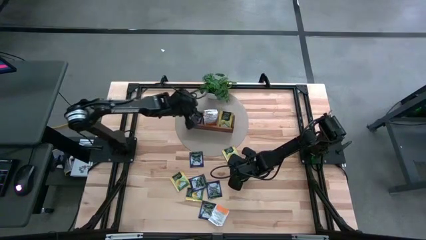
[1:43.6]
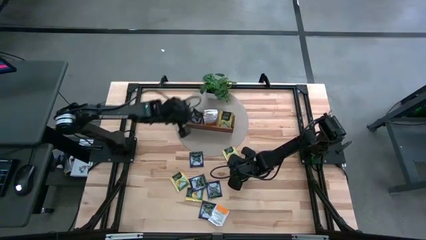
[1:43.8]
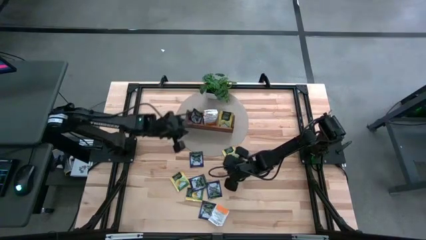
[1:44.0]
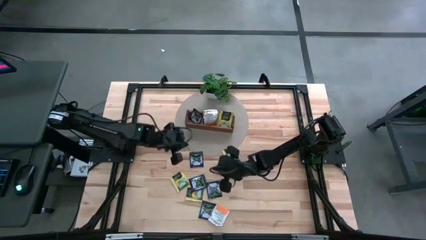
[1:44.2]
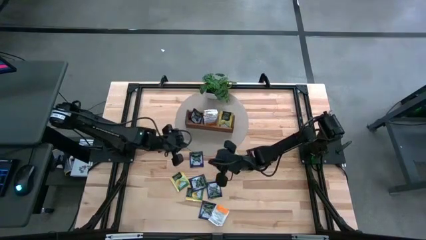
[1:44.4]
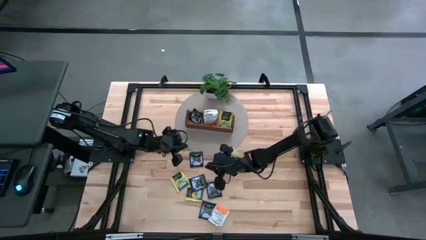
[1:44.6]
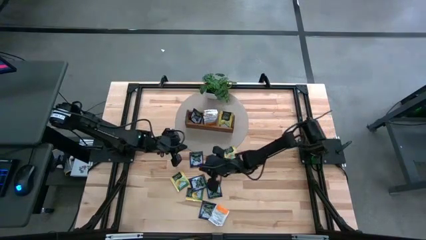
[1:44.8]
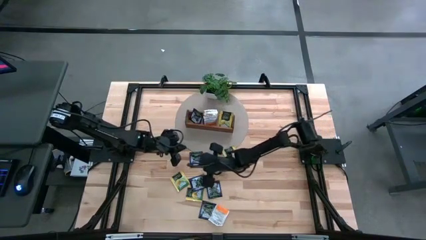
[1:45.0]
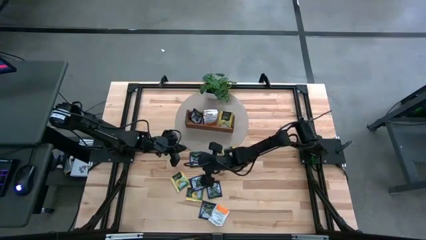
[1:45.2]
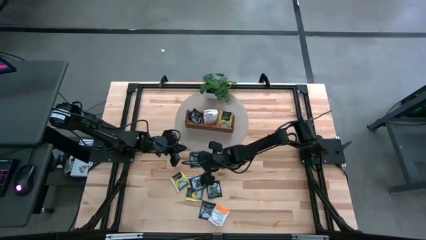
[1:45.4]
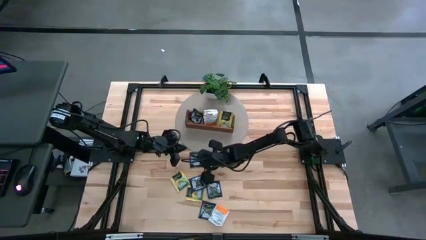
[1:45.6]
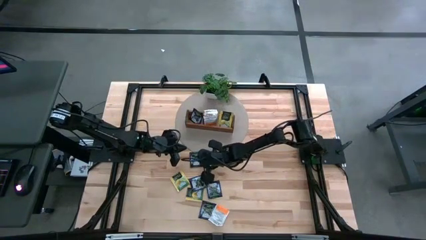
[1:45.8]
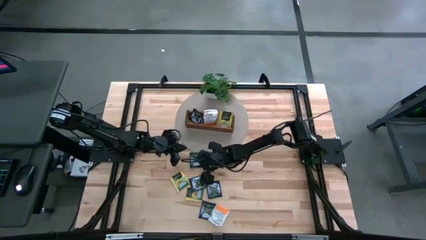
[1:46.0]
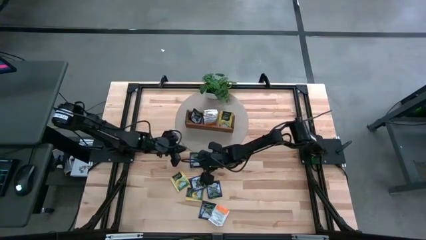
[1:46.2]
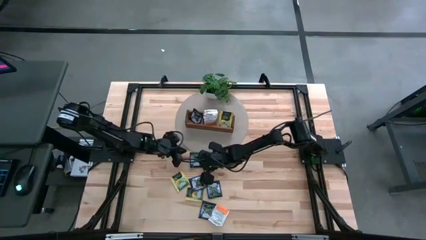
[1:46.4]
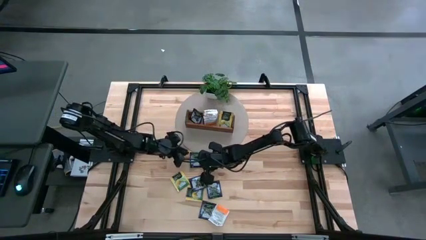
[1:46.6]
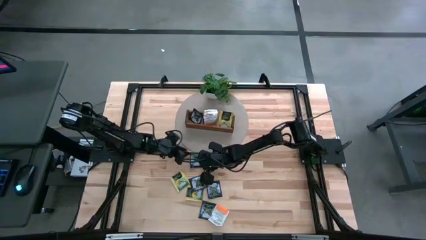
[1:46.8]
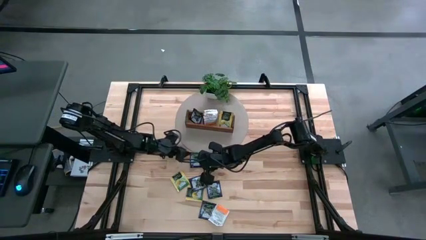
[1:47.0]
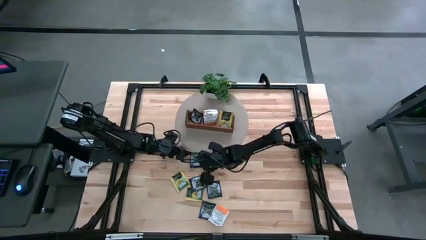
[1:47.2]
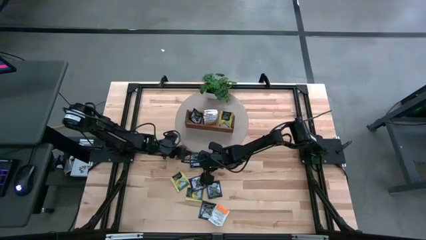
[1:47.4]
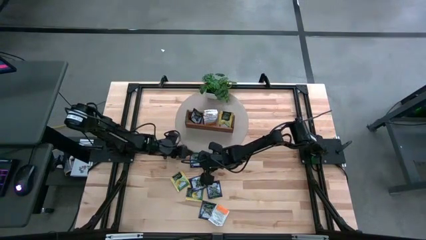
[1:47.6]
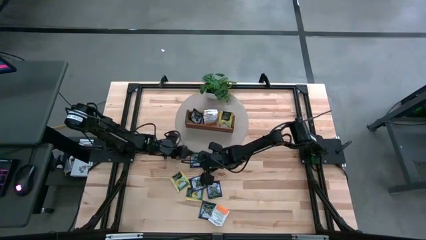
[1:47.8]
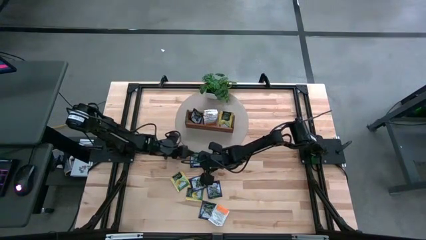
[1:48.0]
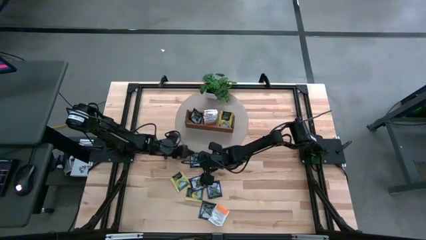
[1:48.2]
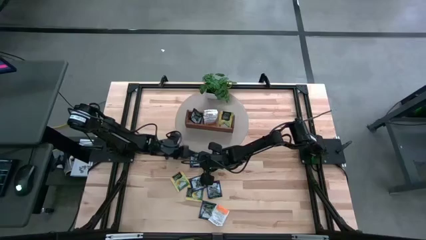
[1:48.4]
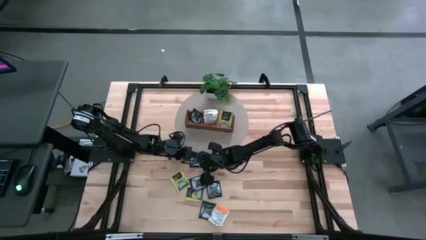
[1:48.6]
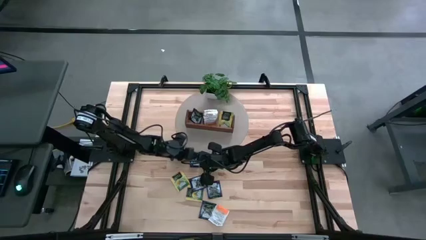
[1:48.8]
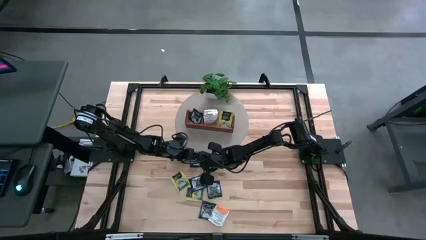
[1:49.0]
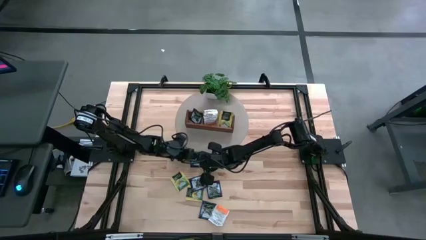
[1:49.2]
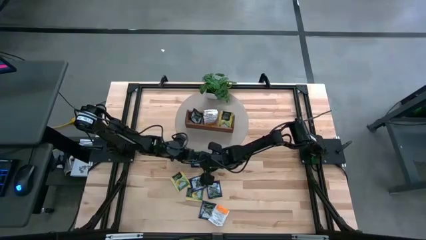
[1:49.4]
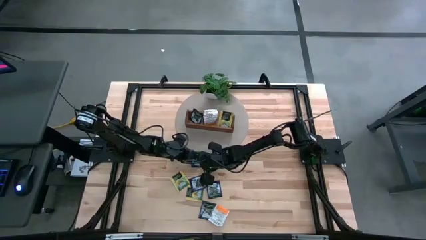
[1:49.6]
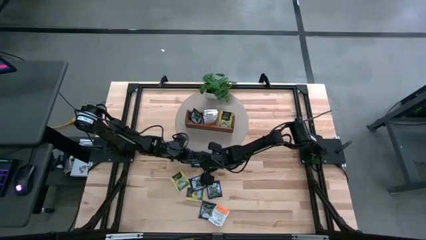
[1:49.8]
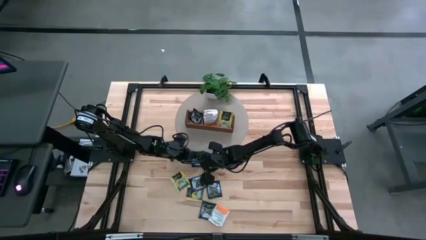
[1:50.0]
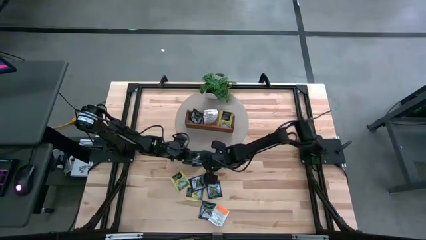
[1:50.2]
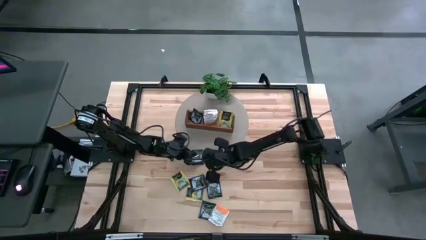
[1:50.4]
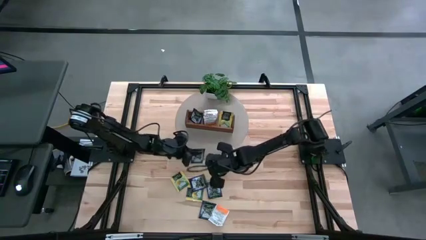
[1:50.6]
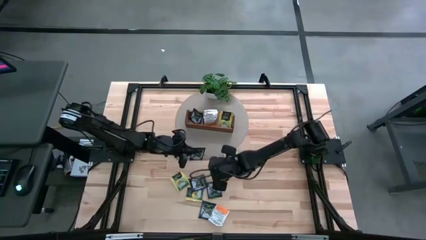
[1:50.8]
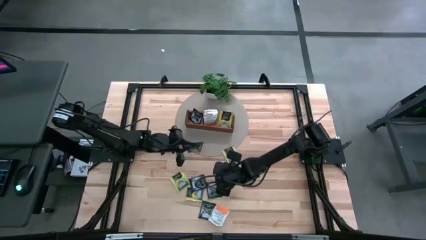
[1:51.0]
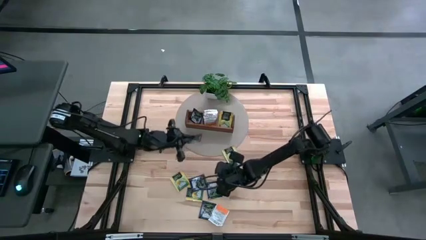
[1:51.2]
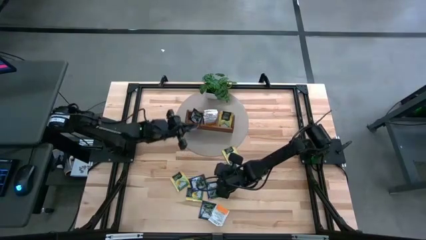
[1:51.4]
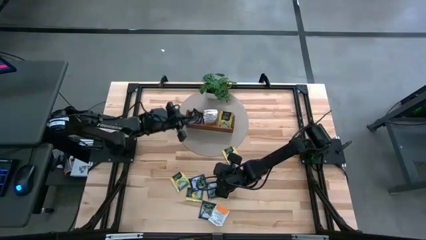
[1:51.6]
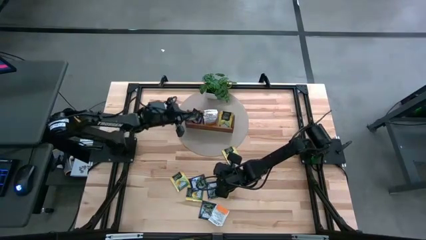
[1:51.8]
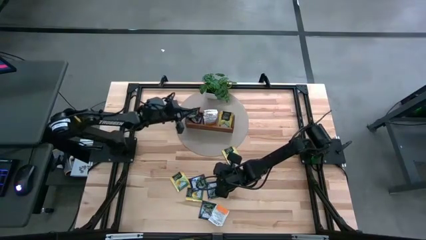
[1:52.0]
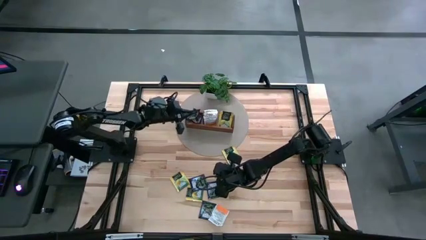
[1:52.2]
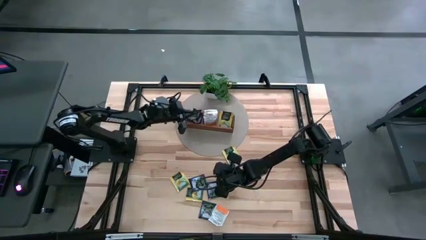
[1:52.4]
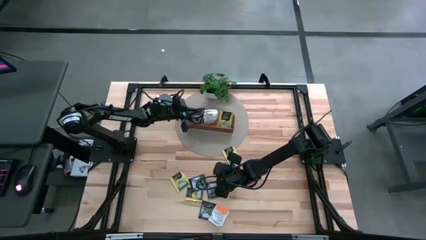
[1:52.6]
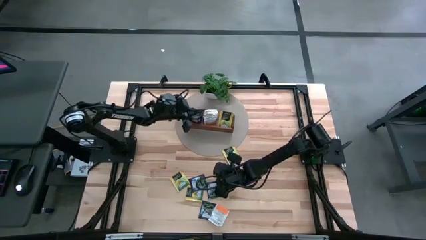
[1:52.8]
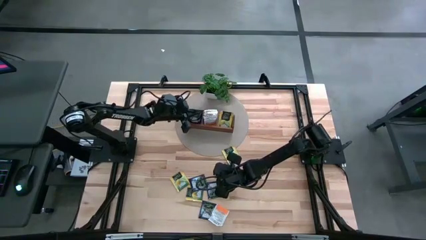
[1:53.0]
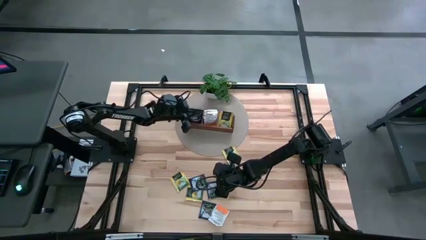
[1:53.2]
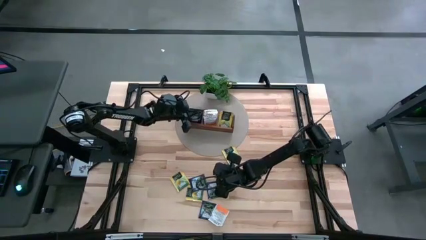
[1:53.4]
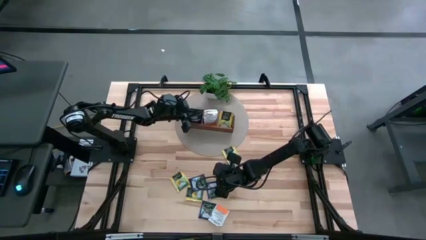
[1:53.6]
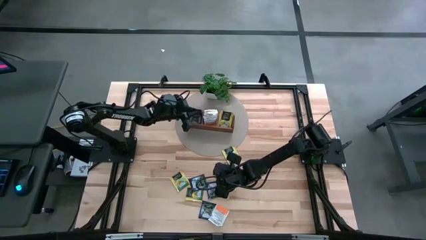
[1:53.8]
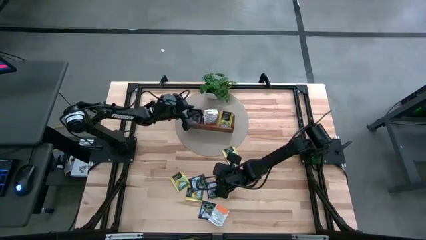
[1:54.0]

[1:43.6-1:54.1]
Task: Pick & Place Tea
Put the purple tea bag into the left section of the wooden organizer

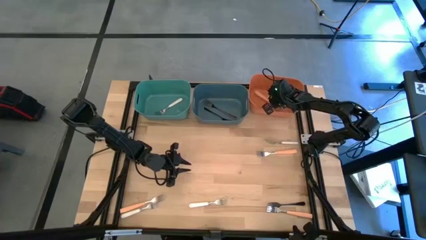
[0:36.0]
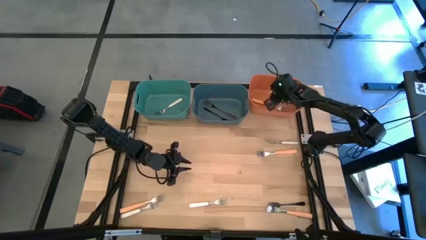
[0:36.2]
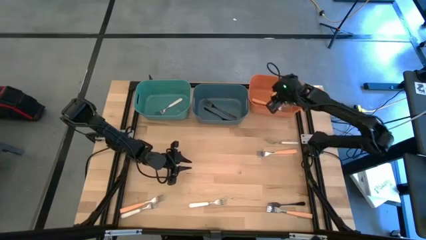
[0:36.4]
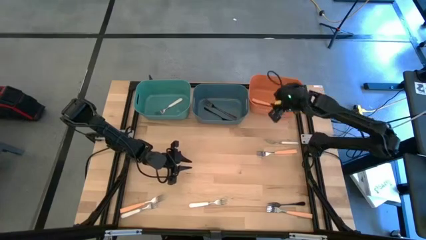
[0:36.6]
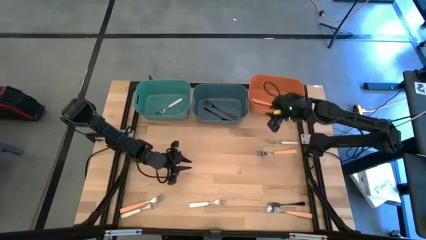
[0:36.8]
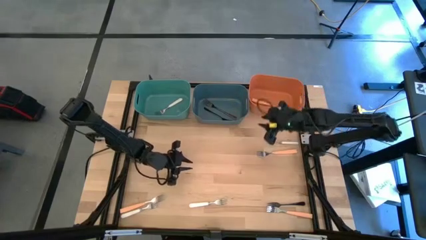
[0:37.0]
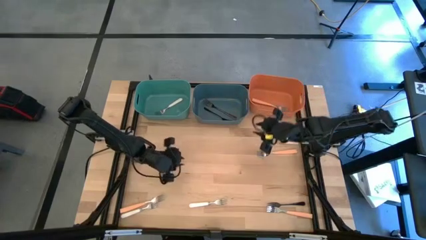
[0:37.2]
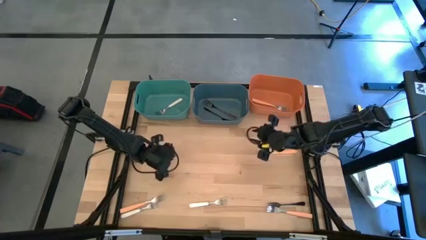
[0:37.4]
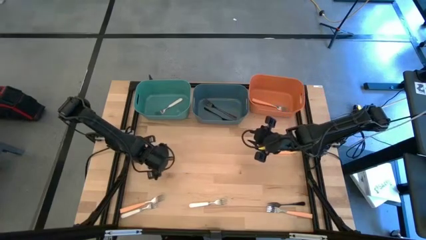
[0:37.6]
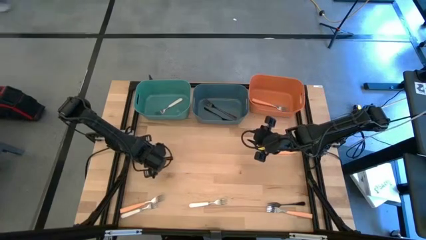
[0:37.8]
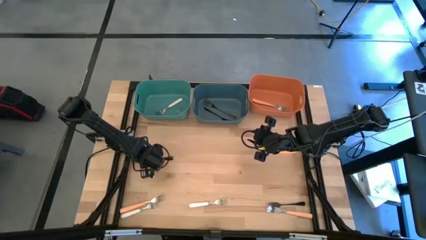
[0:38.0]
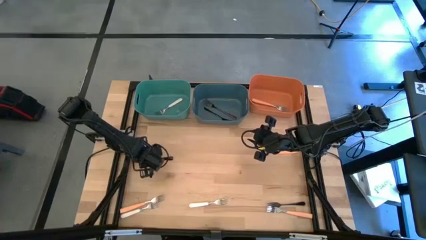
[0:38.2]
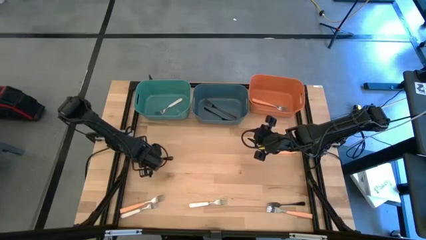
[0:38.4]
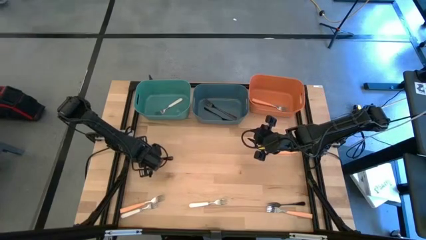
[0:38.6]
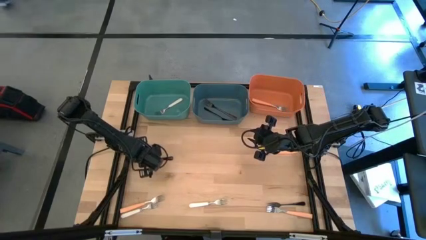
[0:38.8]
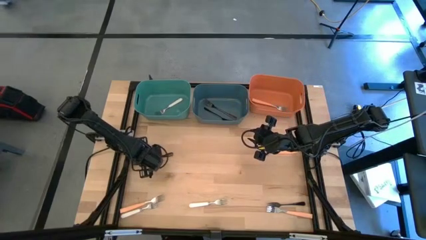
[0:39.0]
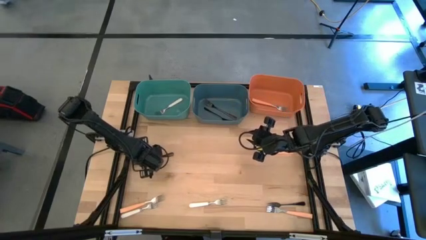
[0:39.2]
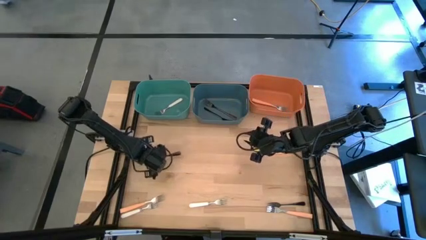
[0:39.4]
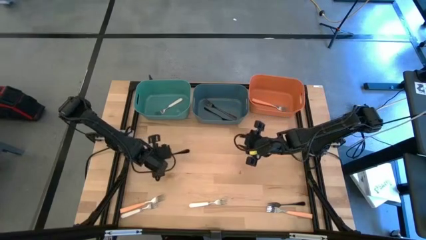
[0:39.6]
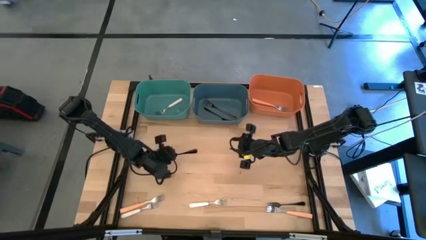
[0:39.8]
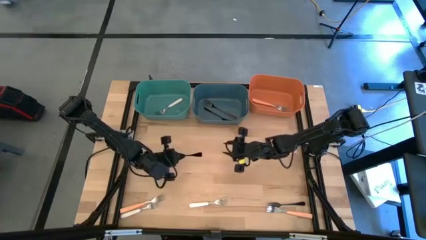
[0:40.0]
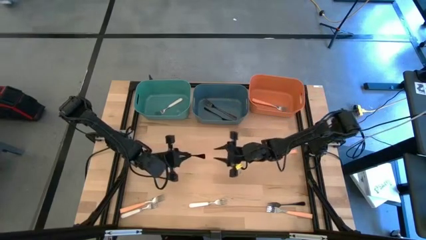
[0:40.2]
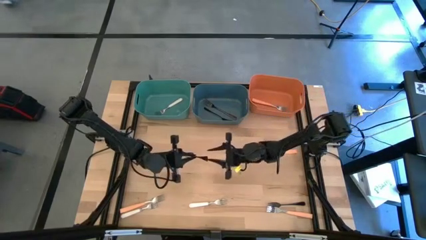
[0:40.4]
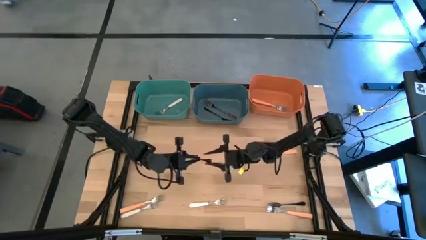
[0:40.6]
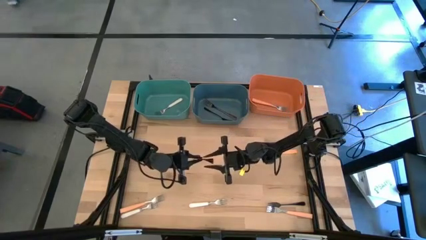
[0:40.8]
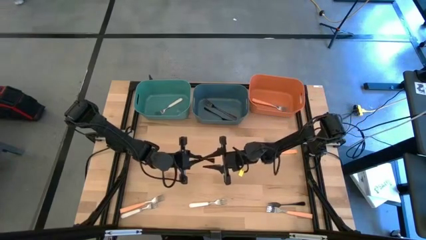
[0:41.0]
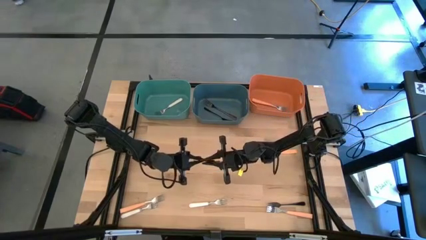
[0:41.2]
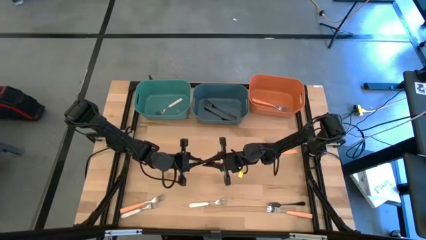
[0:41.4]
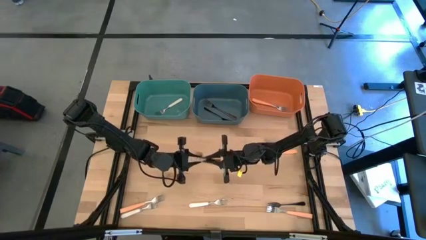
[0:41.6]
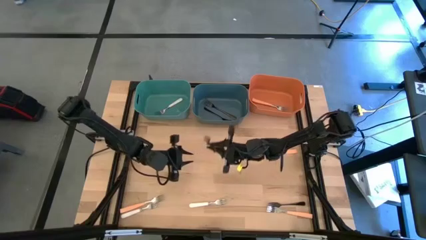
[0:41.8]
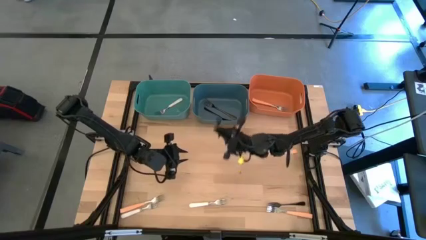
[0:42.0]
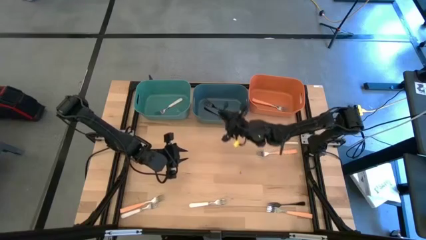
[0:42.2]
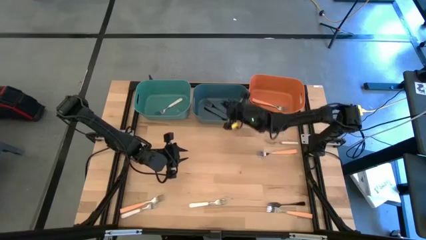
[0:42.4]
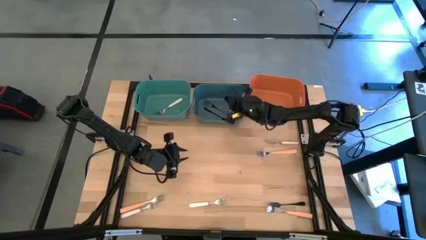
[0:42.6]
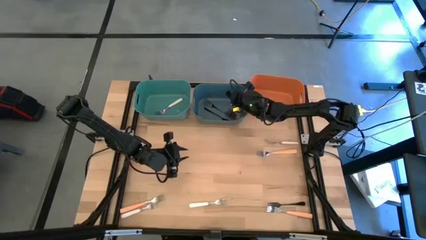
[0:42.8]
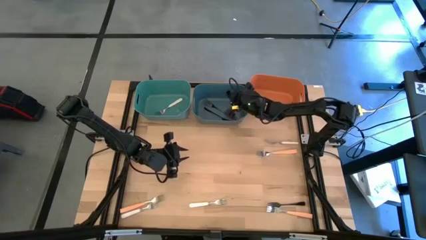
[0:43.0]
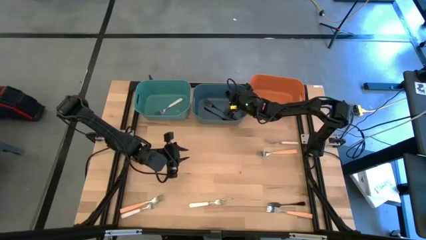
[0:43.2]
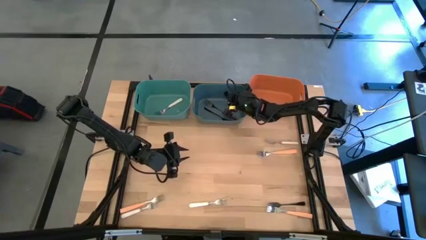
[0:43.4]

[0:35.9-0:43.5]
Task: Sort silverware by color (type)
Put the left black fork into the blue bin
